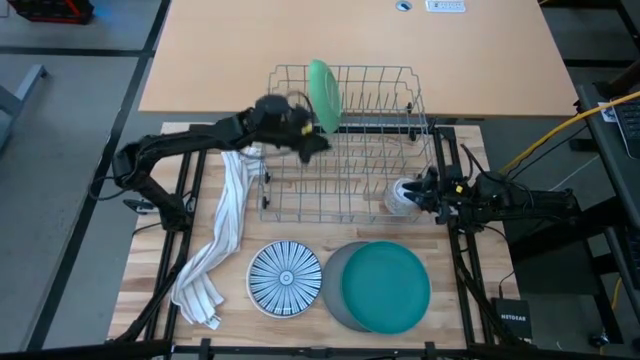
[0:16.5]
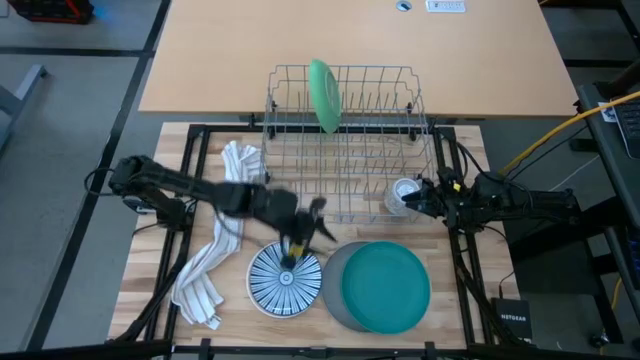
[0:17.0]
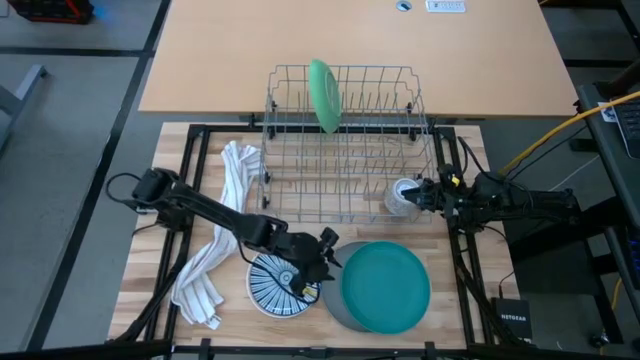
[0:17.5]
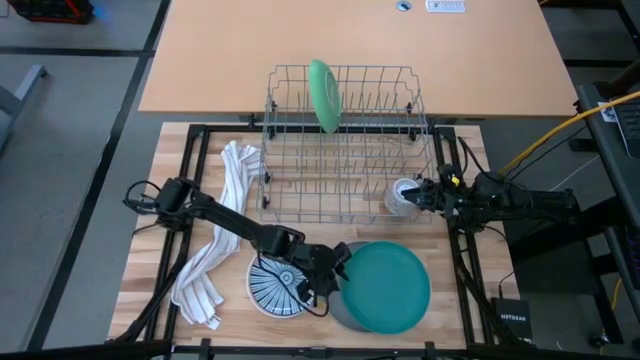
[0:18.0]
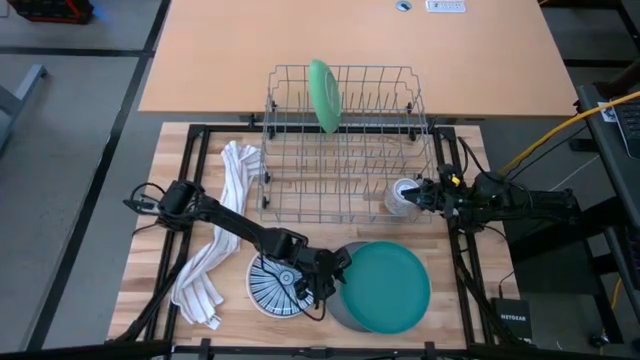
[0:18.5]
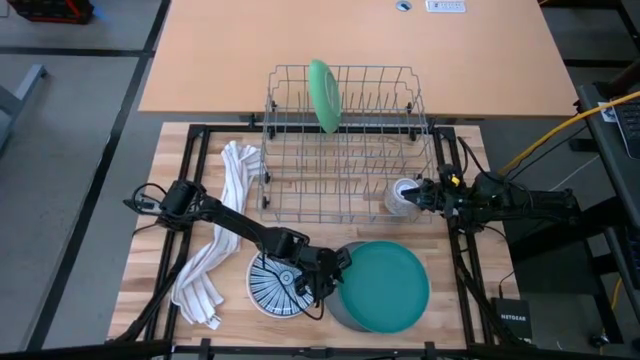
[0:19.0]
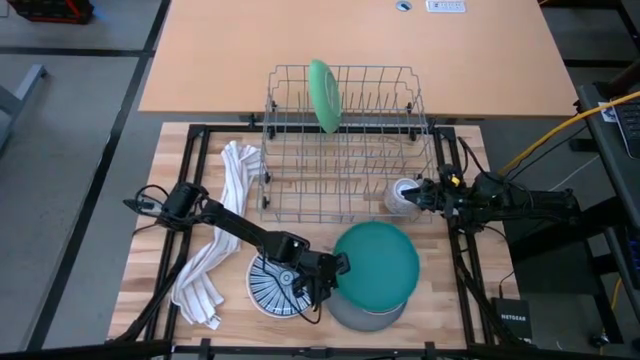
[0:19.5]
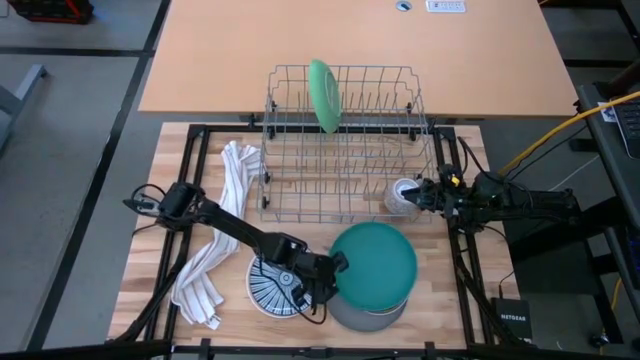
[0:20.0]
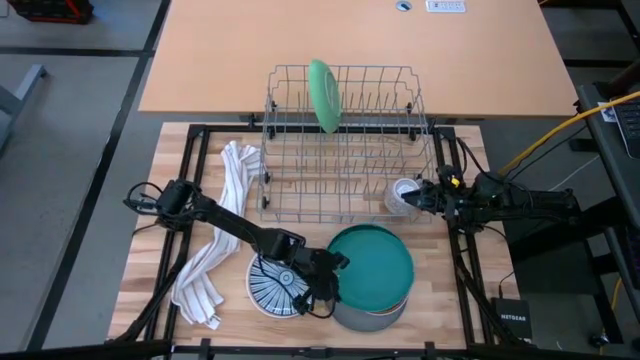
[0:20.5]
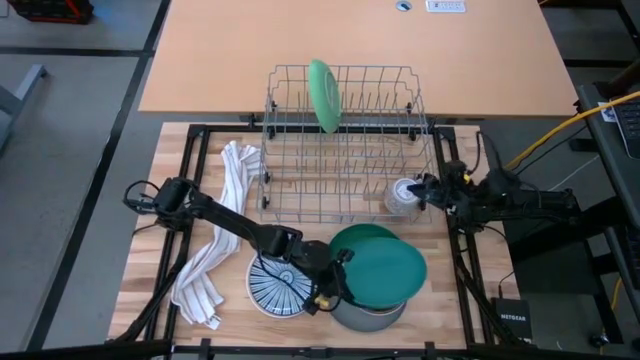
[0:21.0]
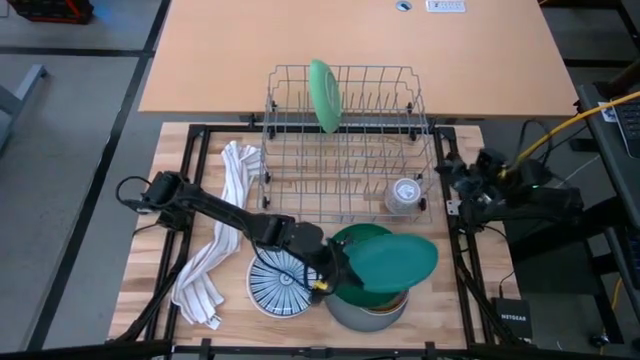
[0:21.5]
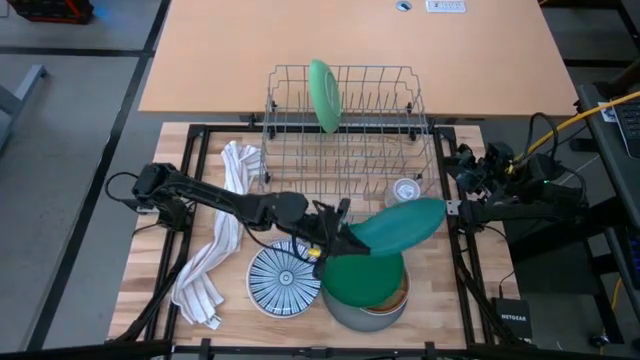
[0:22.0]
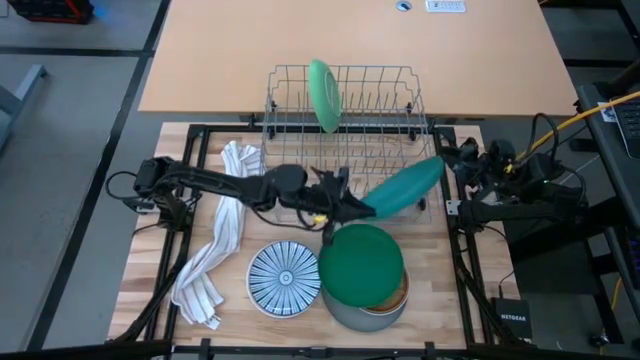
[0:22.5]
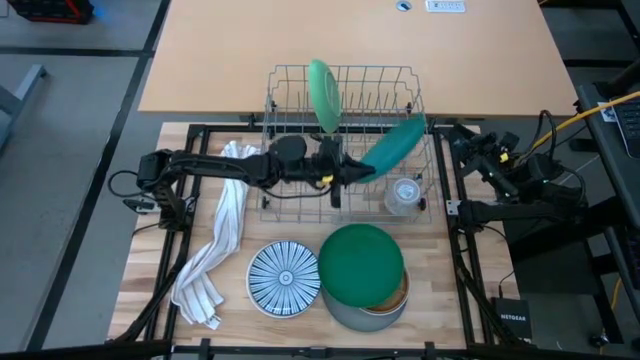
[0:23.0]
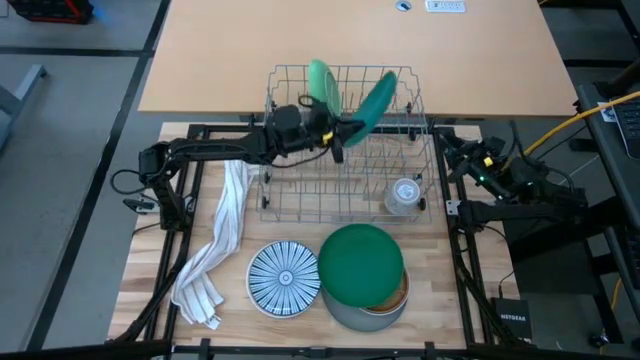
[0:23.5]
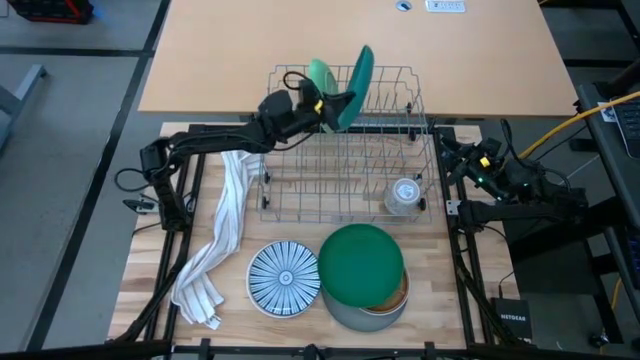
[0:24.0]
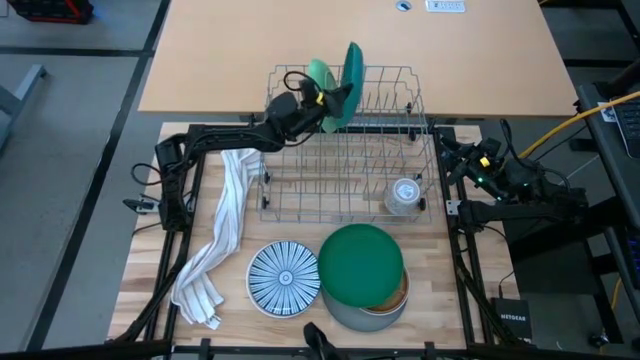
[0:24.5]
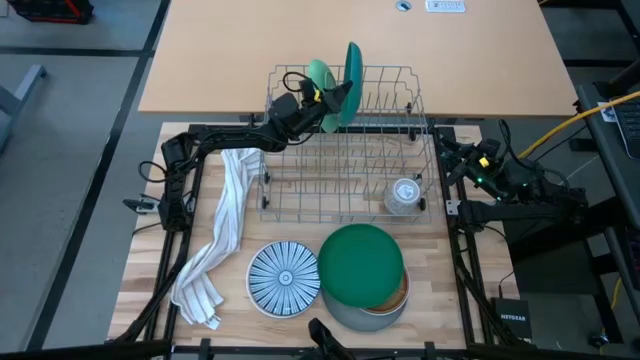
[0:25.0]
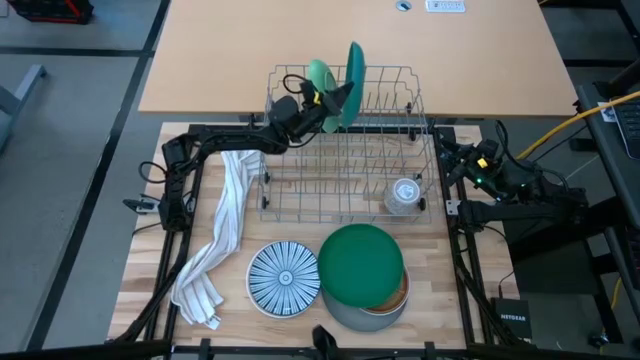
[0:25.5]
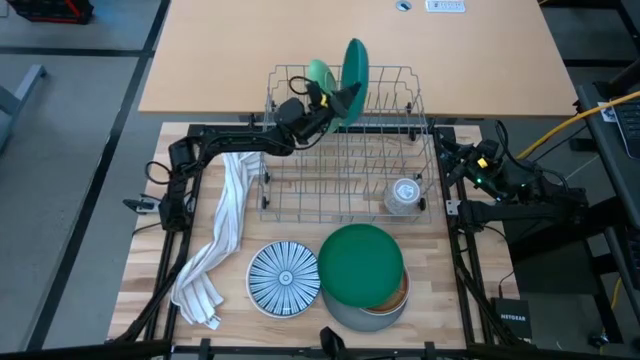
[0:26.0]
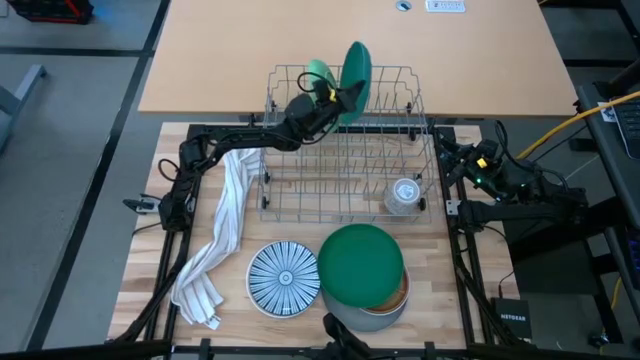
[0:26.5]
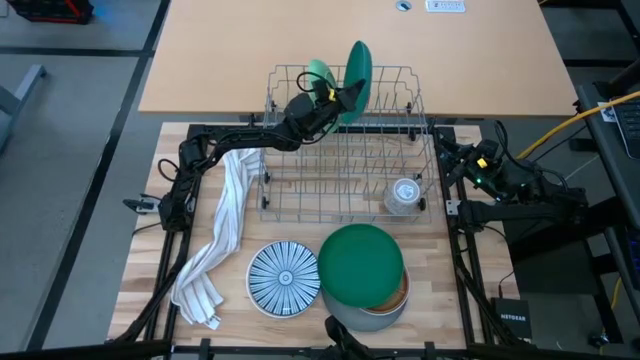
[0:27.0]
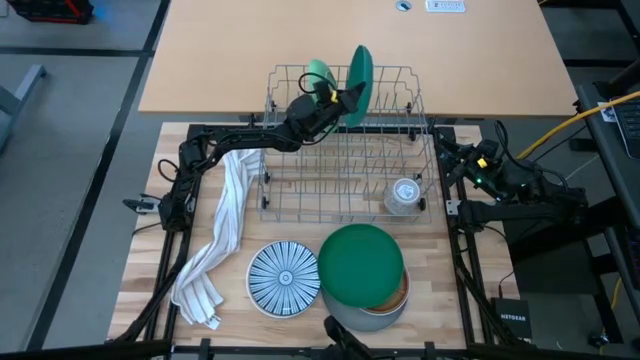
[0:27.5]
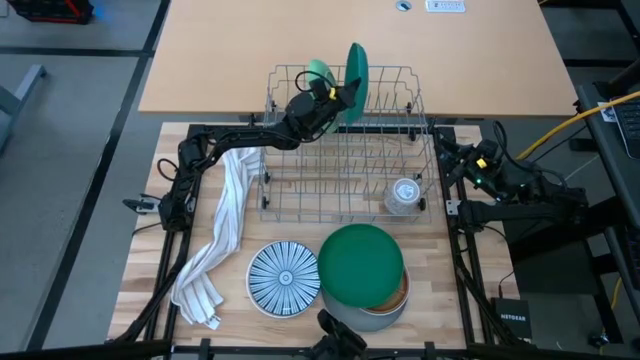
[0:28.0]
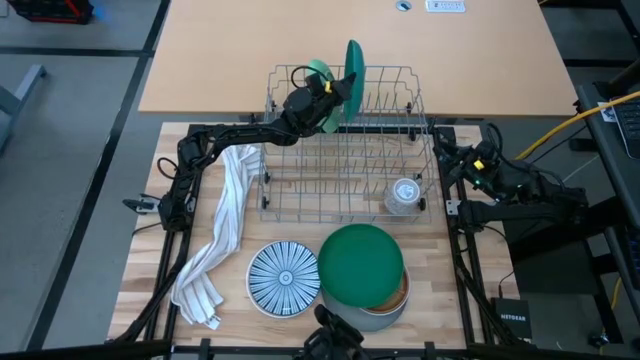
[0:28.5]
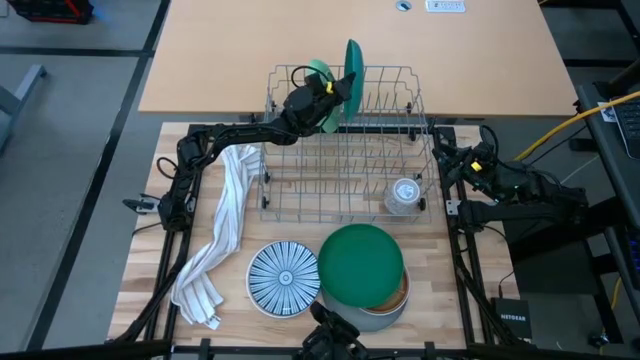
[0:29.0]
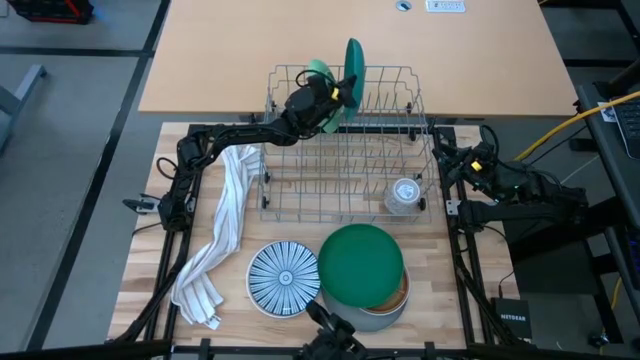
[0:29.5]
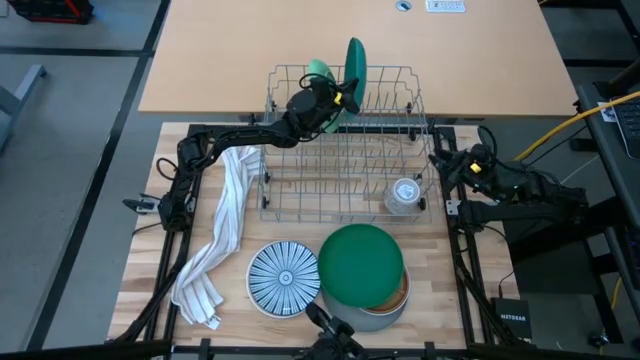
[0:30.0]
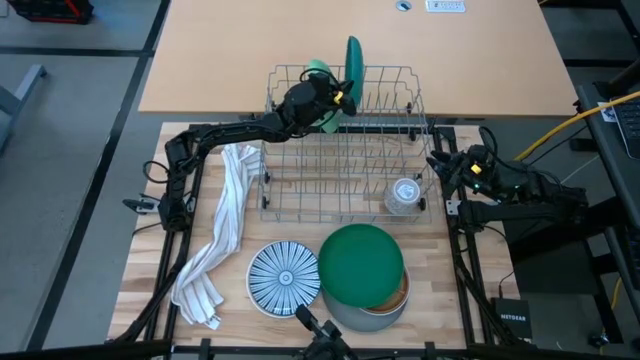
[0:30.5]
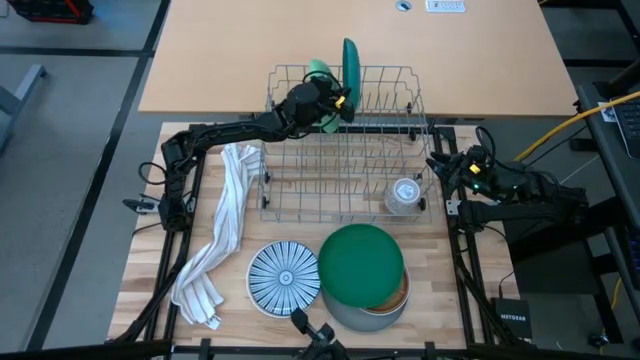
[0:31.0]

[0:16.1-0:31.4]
Task: Sort dishes
Put the blue plate into the dish rack
